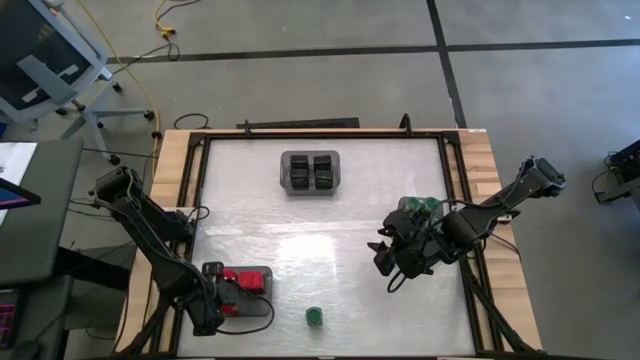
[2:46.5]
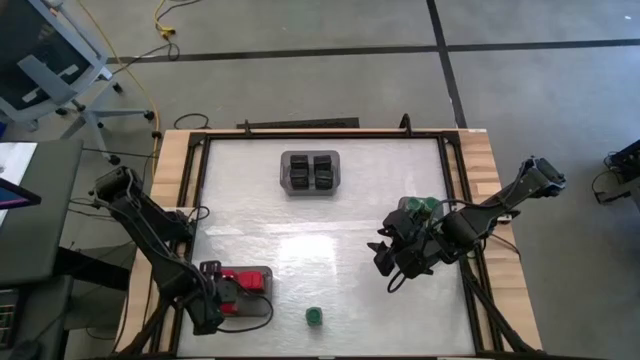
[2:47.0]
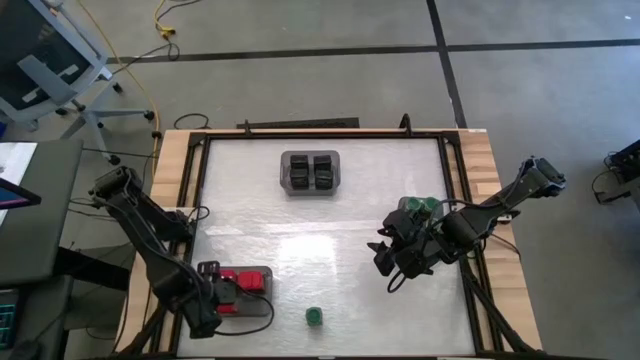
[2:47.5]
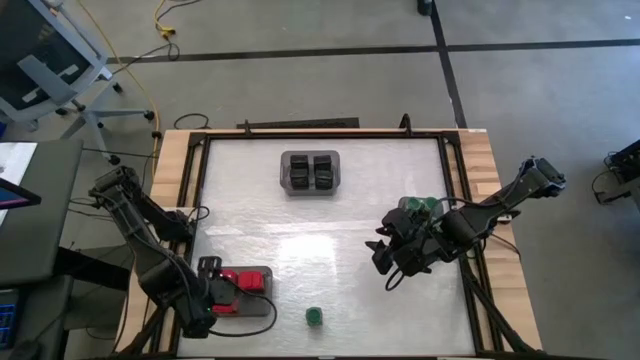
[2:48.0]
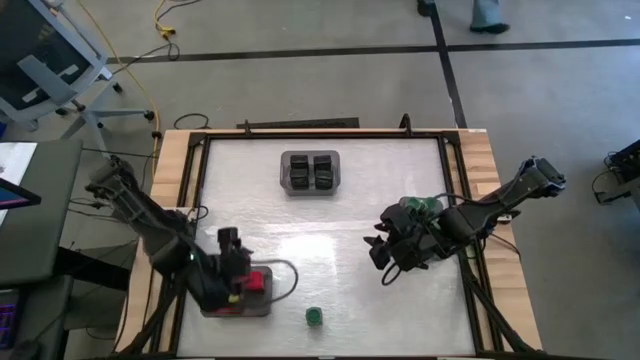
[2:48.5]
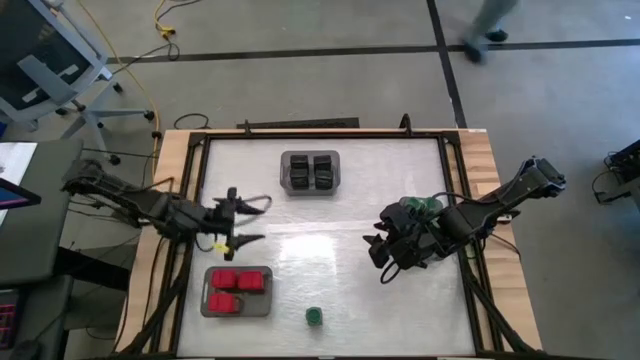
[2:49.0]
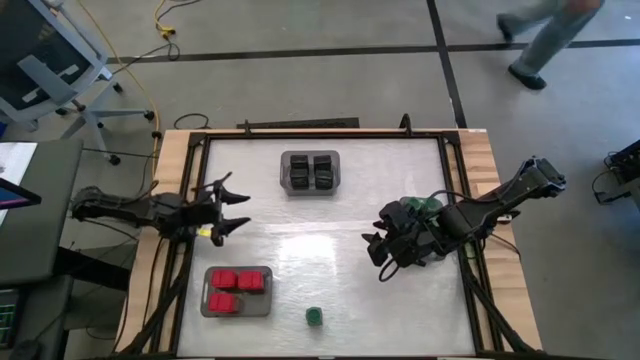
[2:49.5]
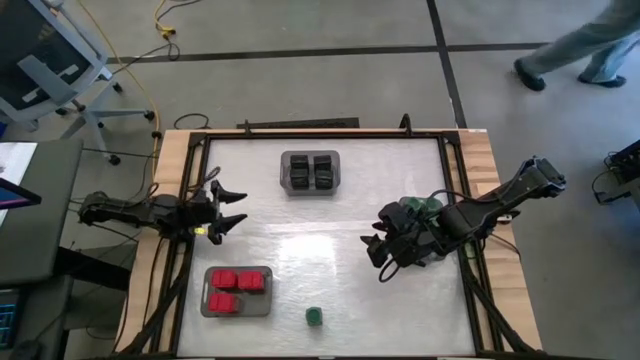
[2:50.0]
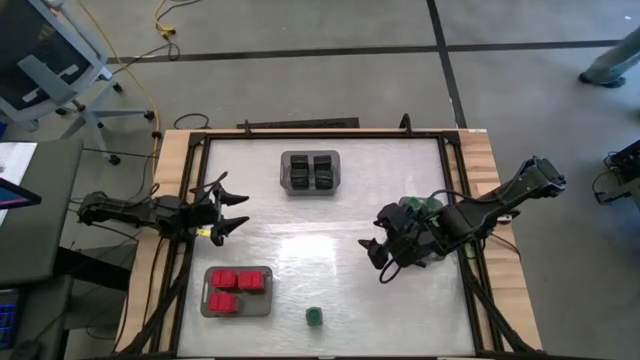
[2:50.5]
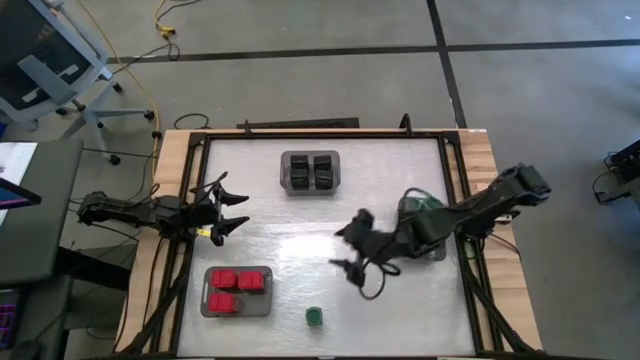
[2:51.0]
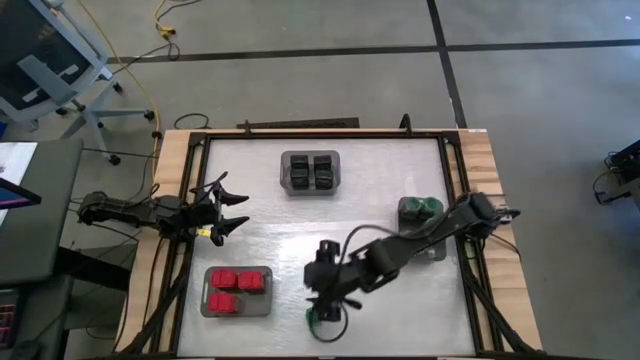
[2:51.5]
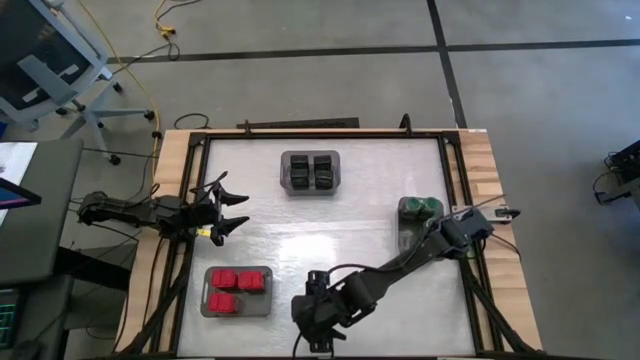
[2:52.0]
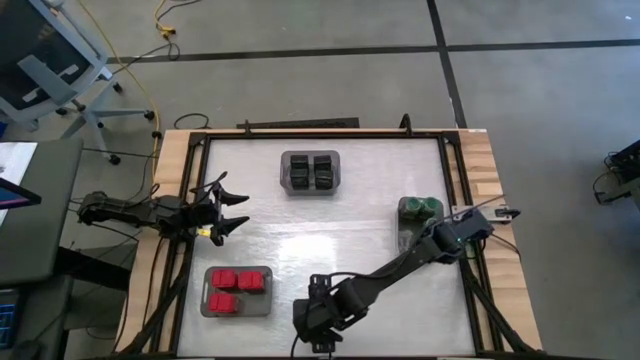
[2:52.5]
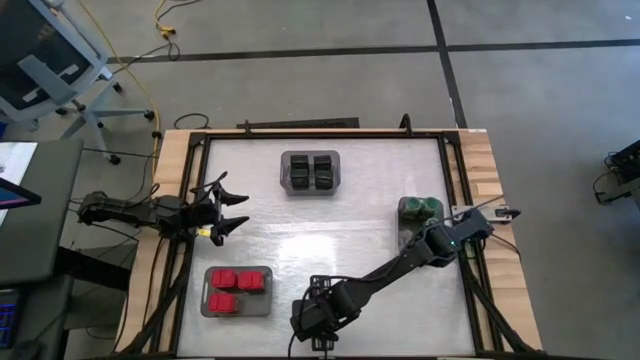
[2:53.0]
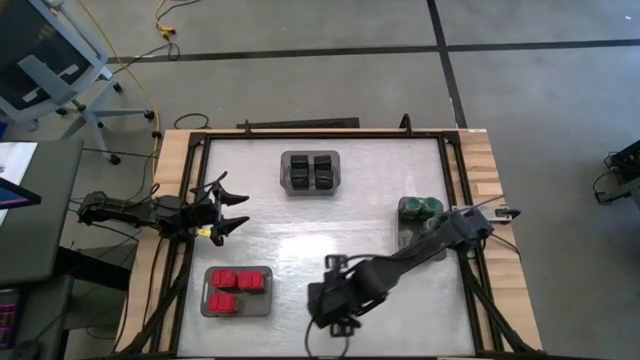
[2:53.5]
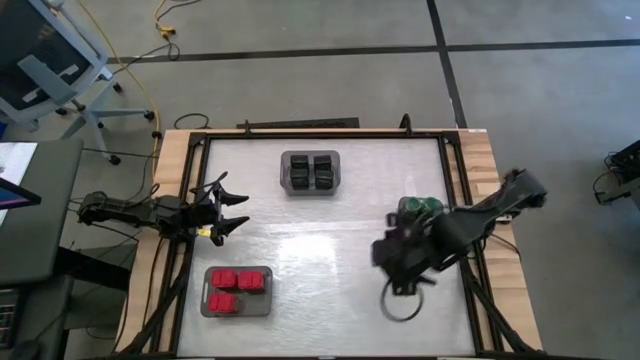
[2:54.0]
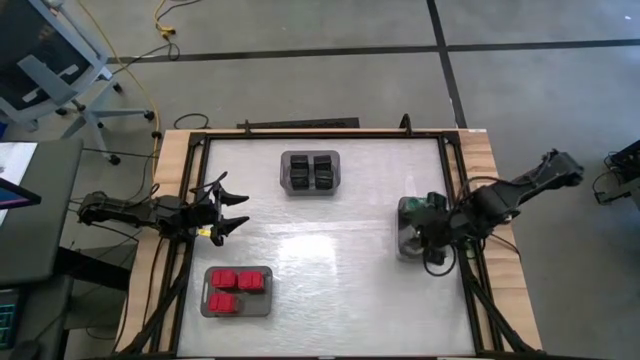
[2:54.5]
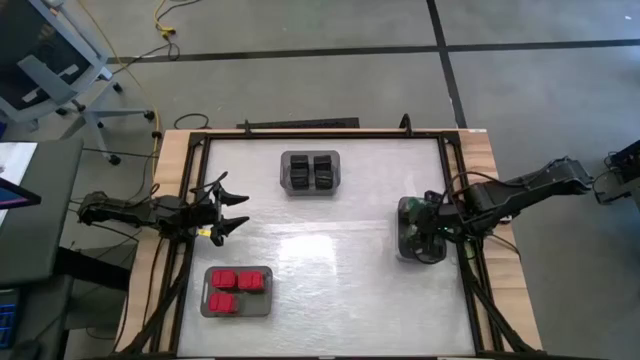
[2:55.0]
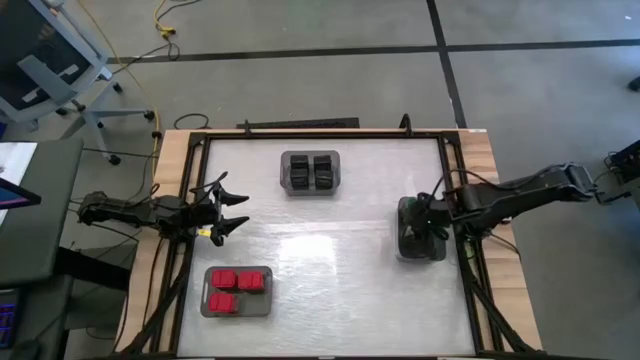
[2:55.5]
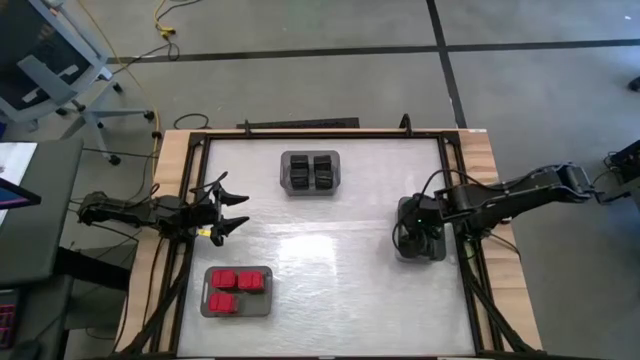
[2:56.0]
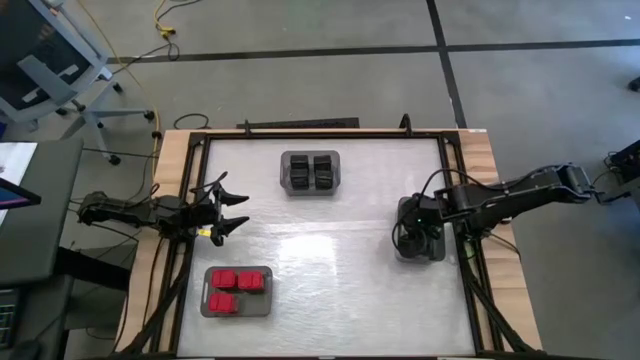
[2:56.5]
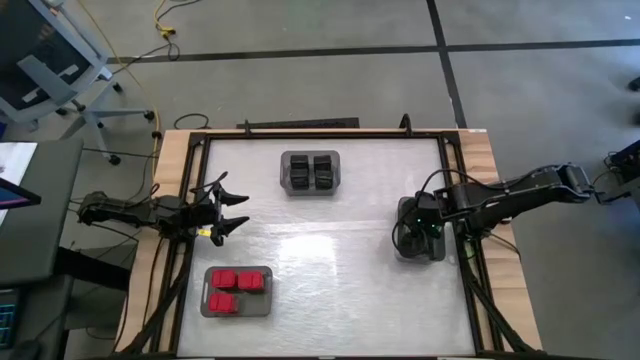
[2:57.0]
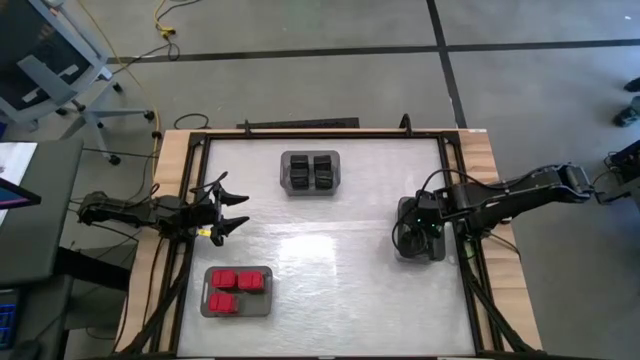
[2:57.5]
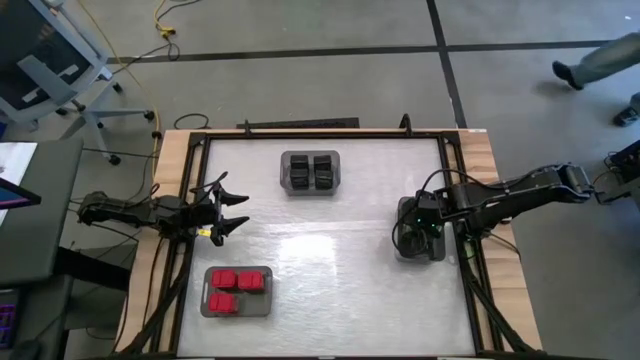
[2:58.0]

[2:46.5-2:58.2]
Task: Sort spices by type
Put the green seasoning bottle into the middle right black transparent bin

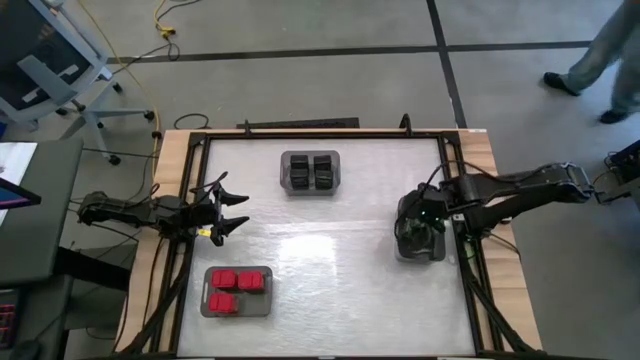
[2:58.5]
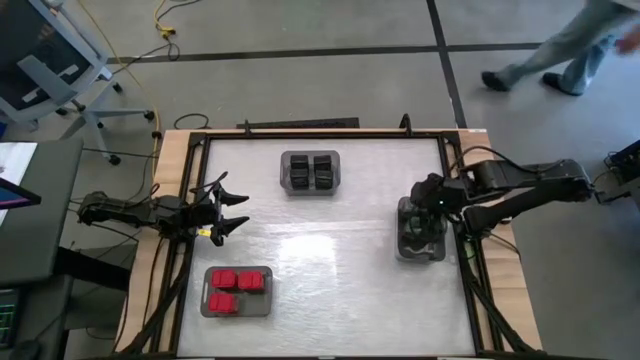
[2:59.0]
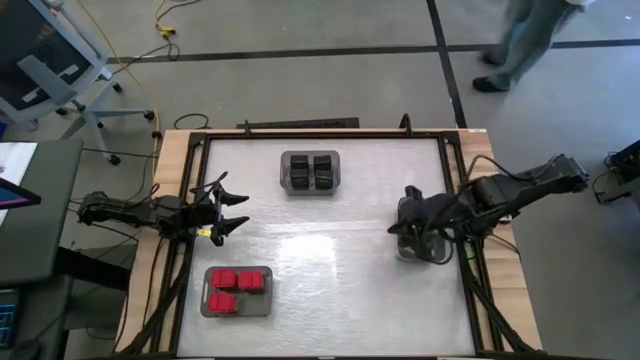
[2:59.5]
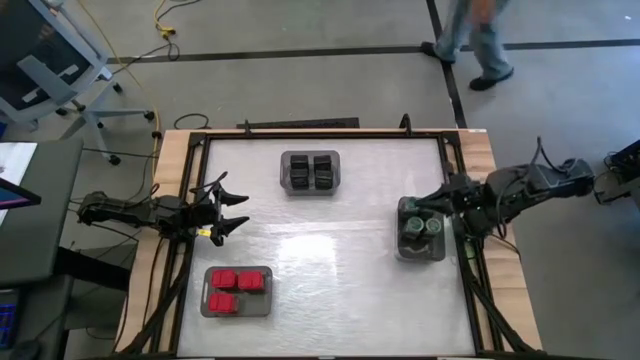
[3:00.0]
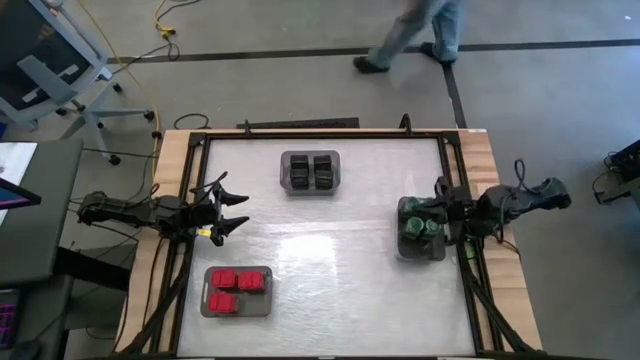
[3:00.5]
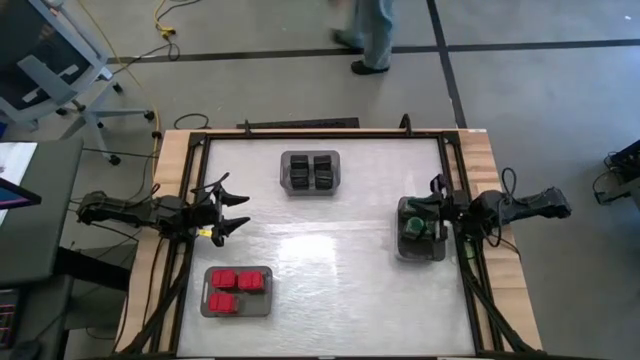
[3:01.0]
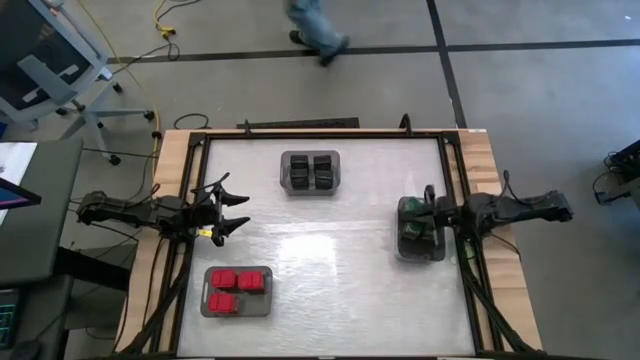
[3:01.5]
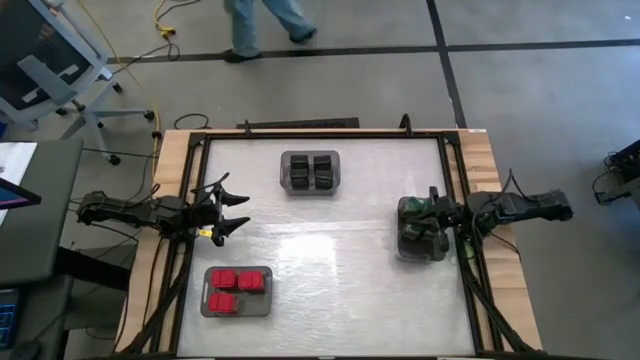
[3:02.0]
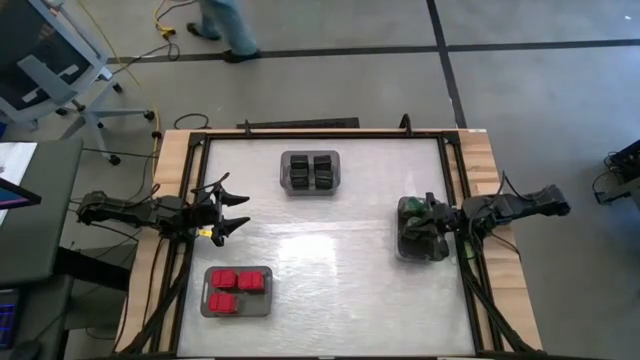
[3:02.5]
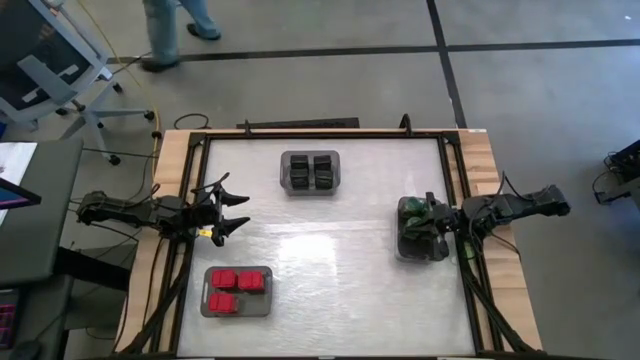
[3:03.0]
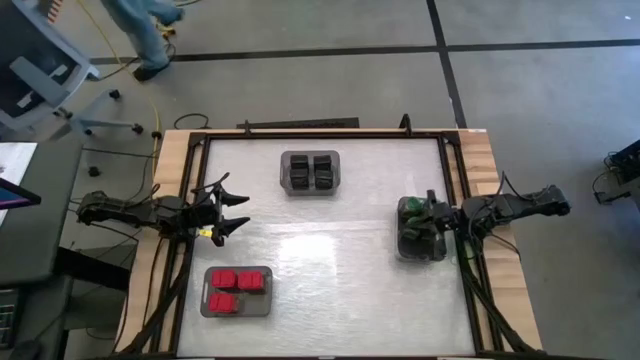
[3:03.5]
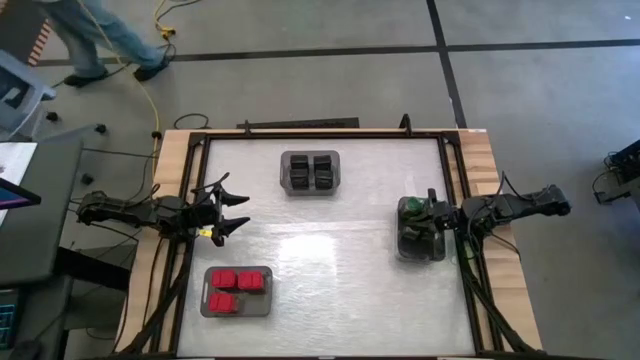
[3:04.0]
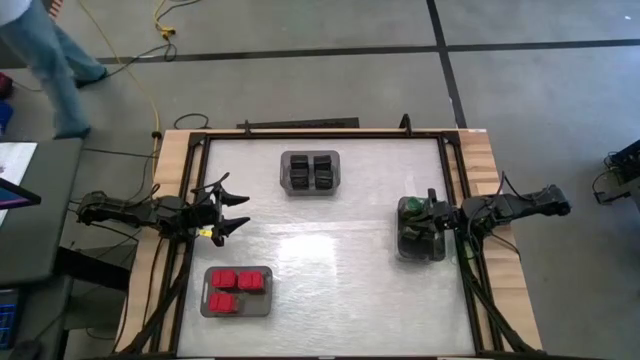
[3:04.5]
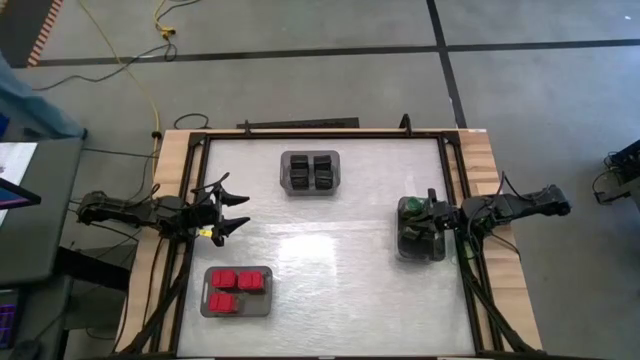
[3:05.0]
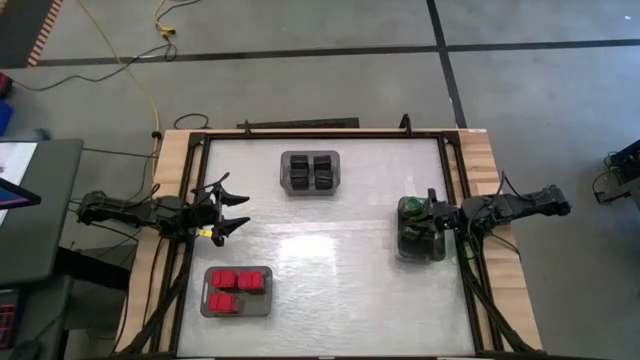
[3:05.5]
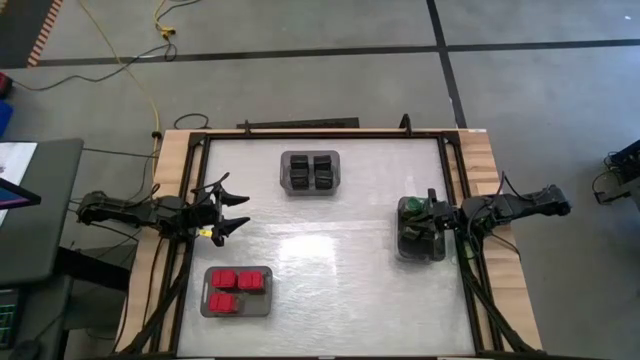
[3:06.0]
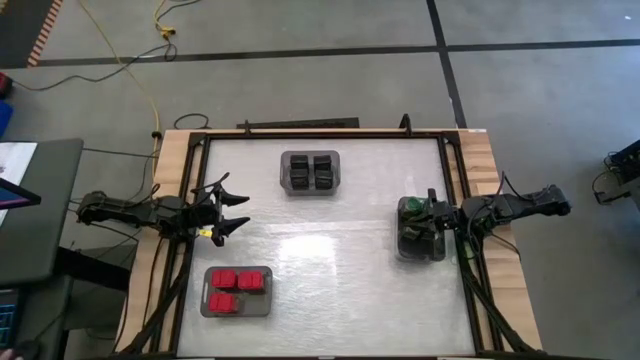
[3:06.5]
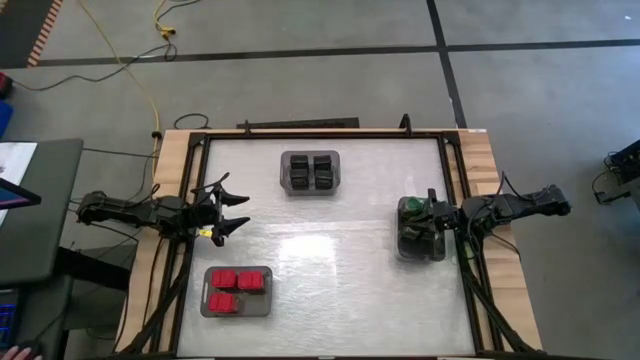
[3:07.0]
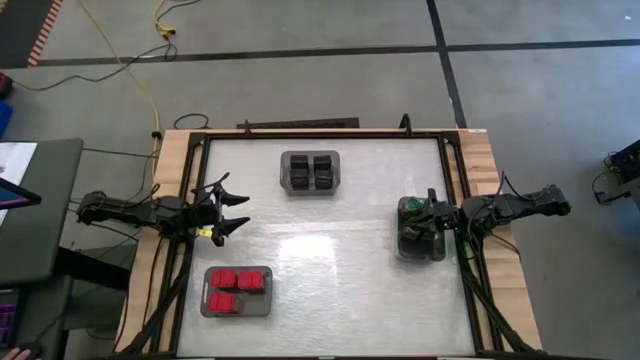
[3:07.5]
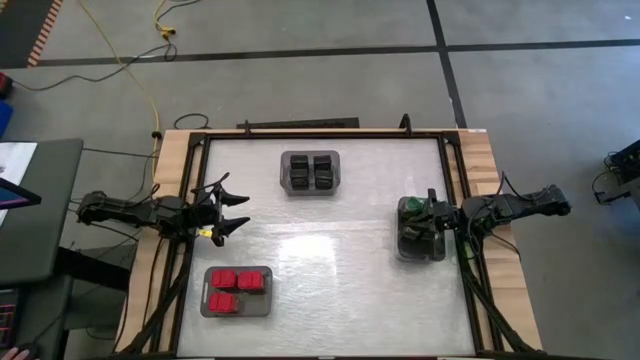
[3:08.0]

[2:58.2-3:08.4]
Return to Home Position
